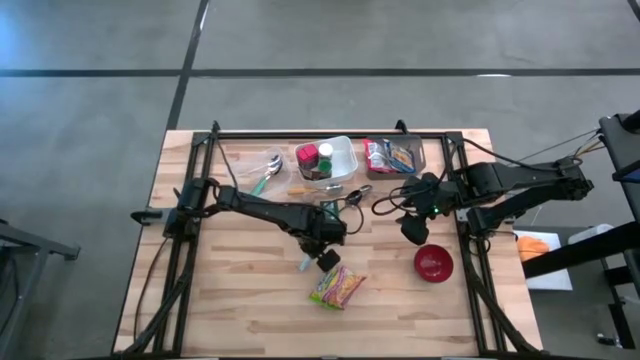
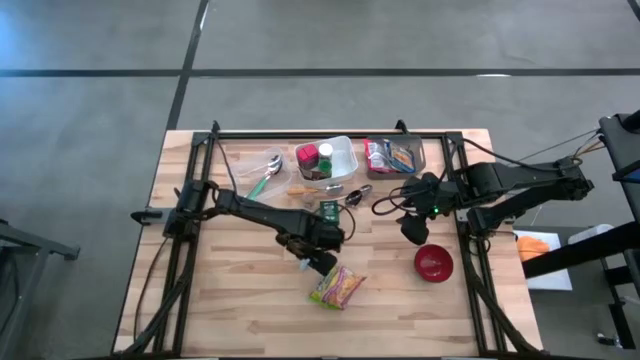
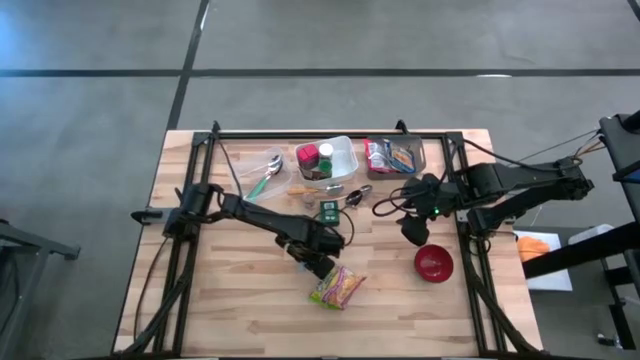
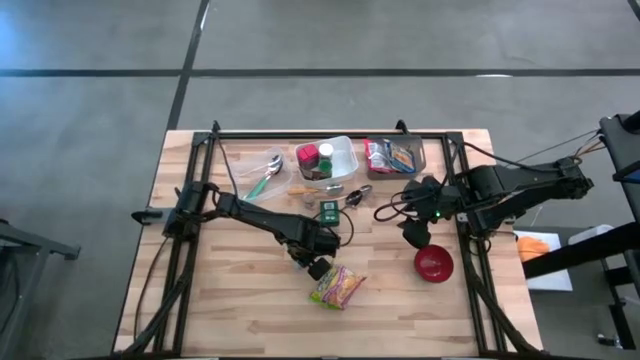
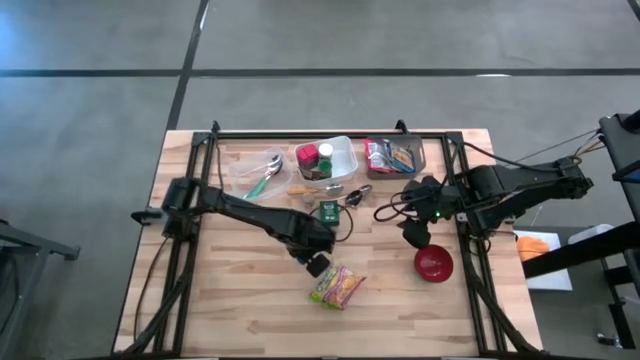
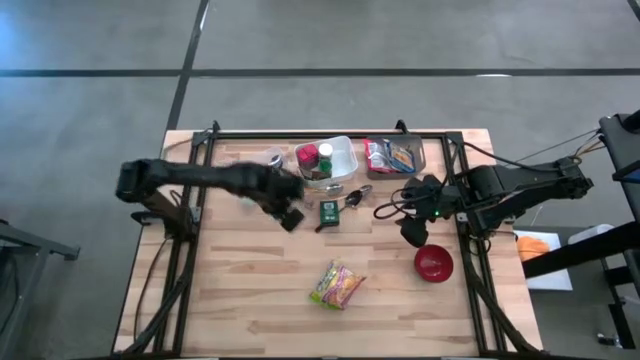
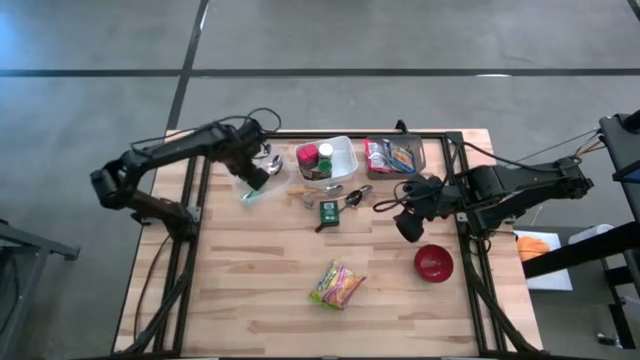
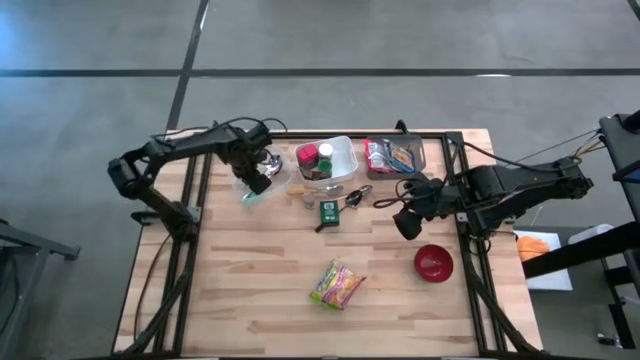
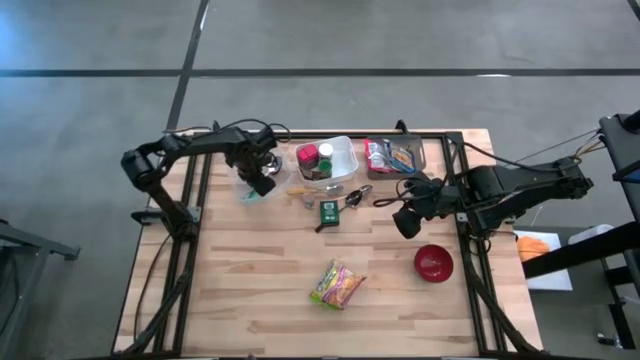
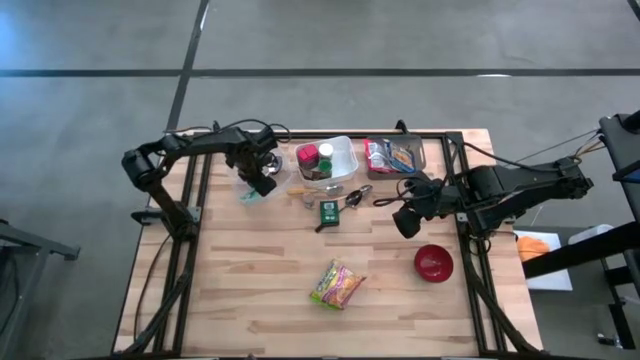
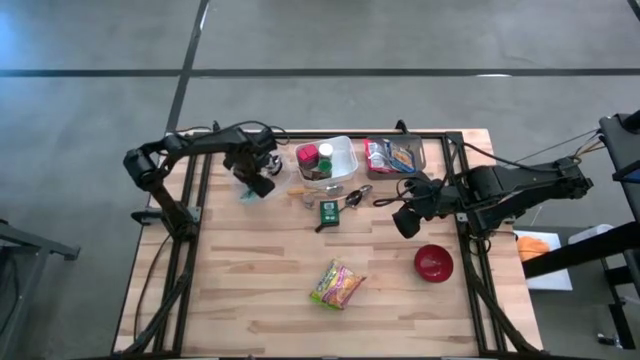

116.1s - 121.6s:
Put the blue spoon into the transparent bin

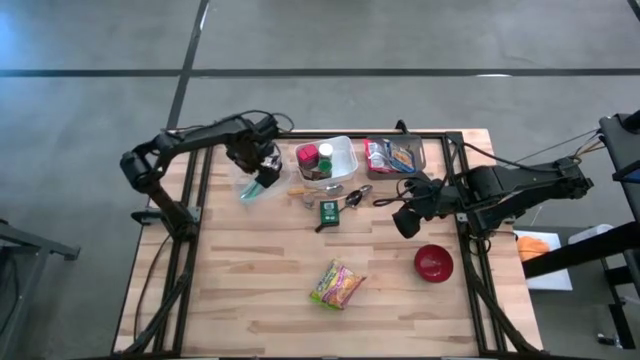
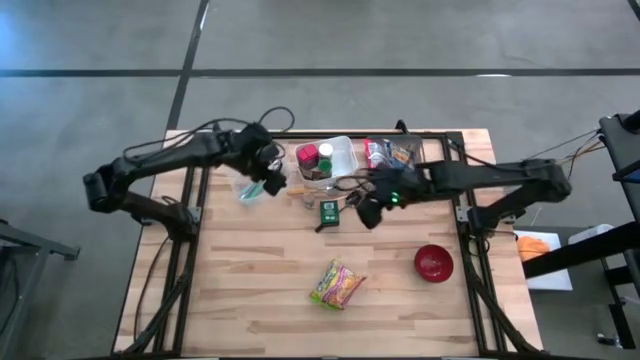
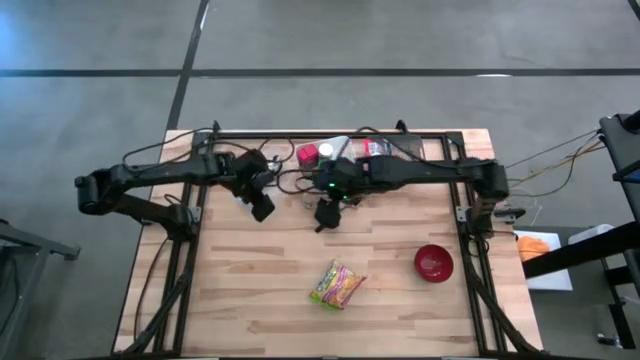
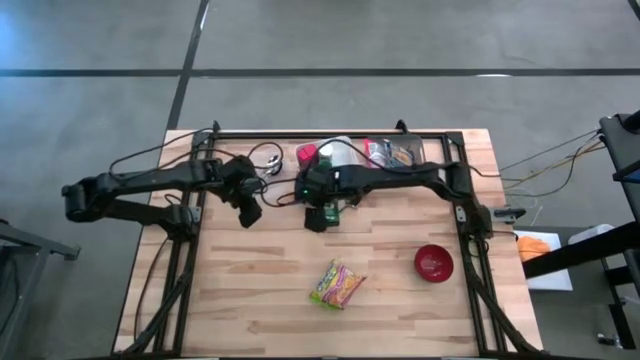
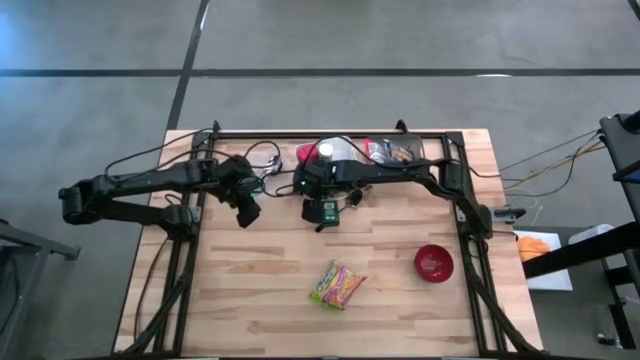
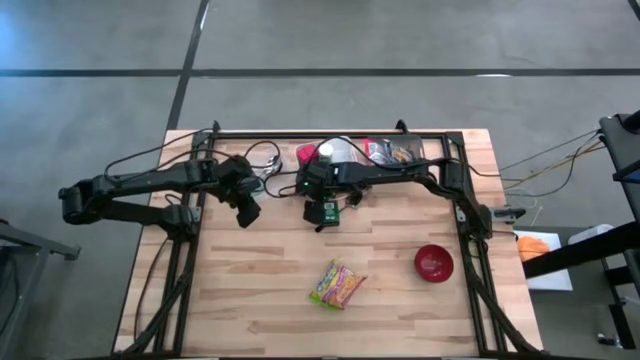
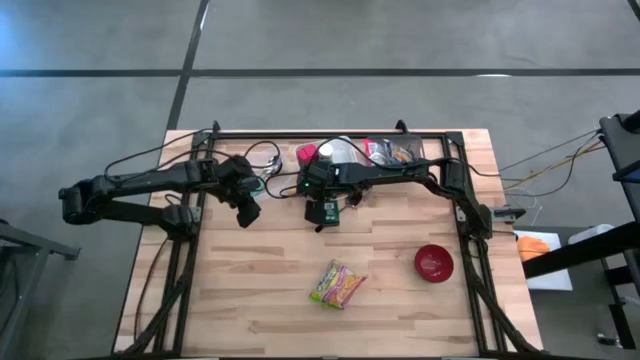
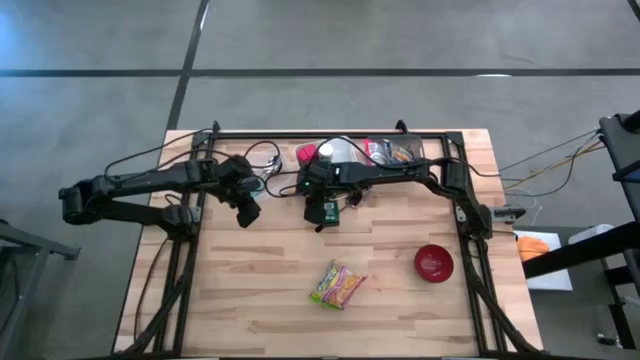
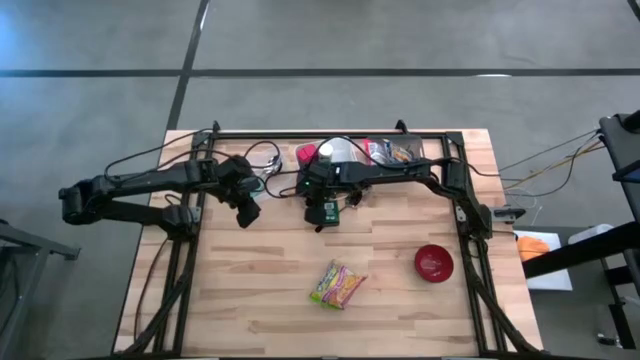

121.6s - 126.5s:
Put the brown seasoning bottle into the white bin

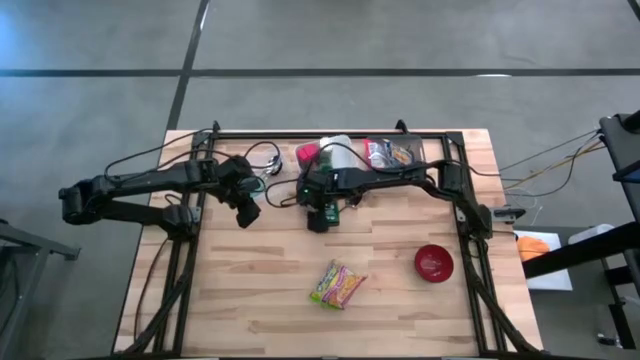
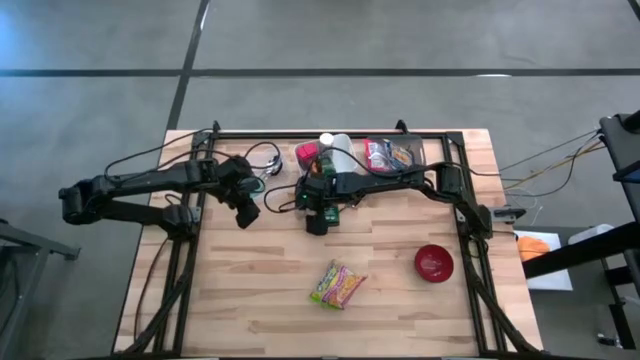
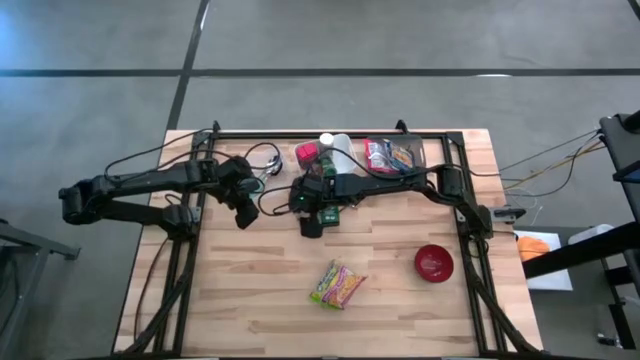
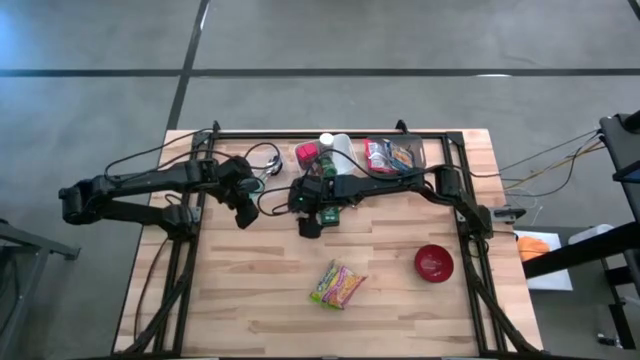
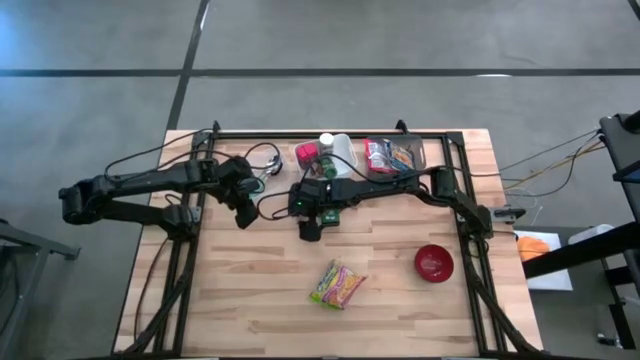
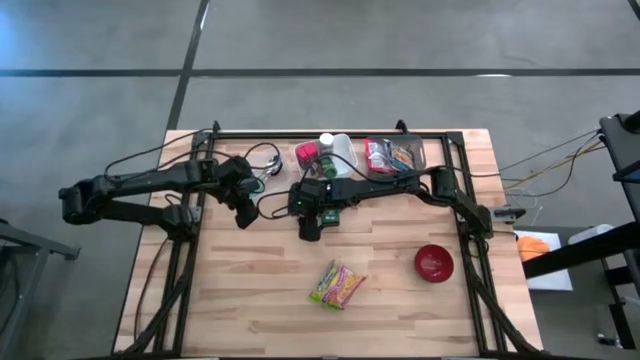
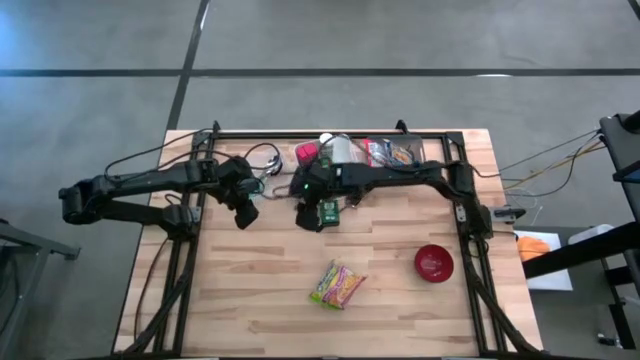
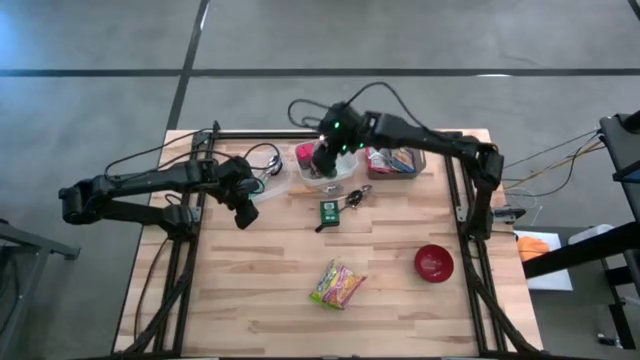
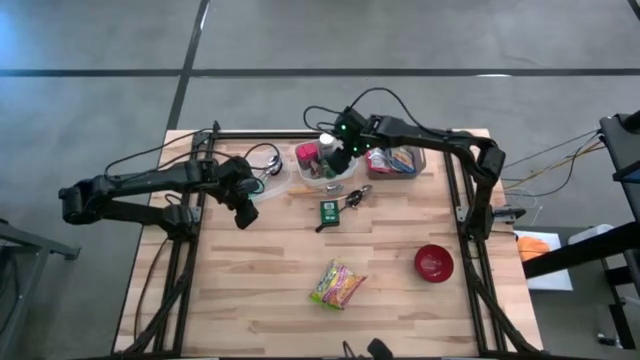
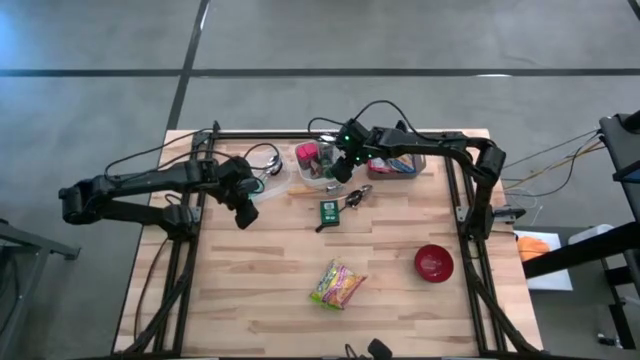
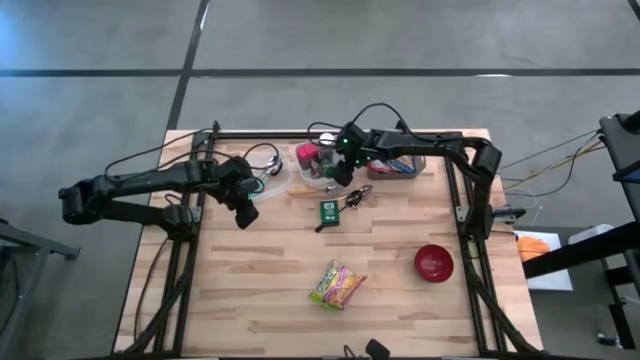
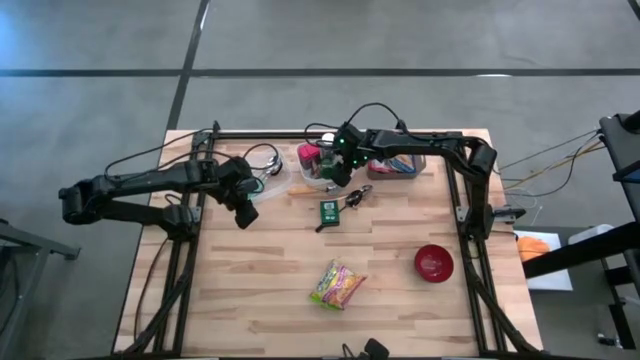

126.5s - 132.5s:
Put the brown seasoning bottle into the white bin

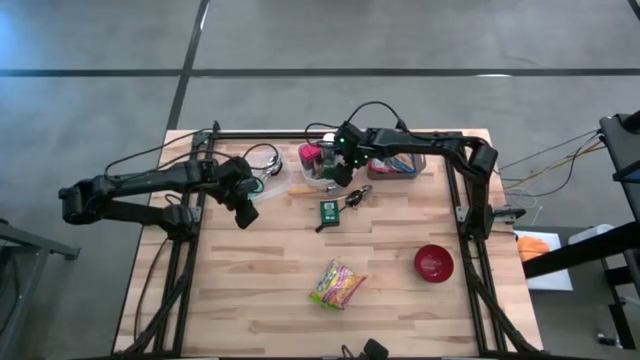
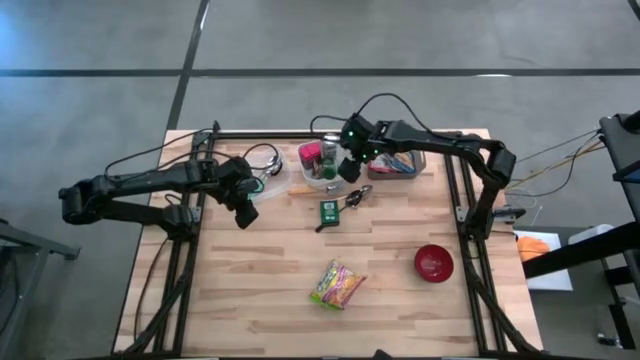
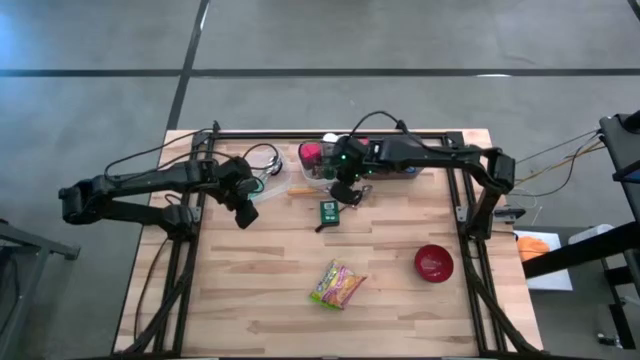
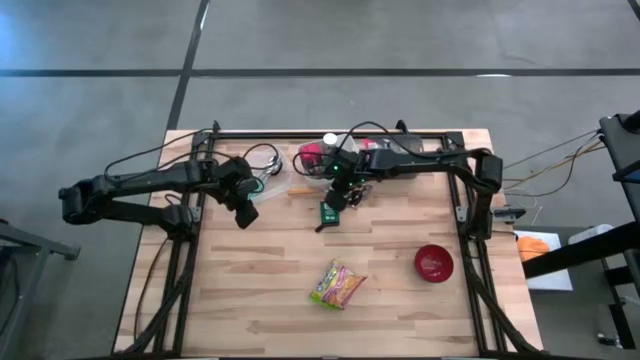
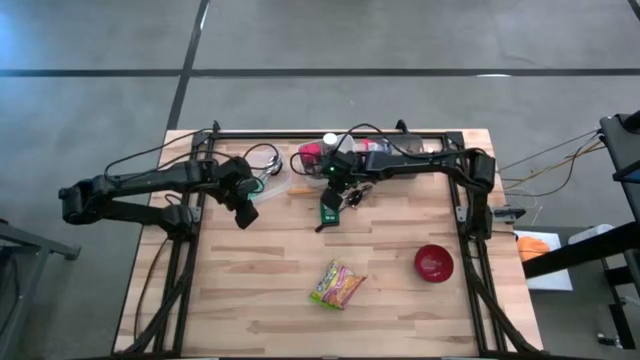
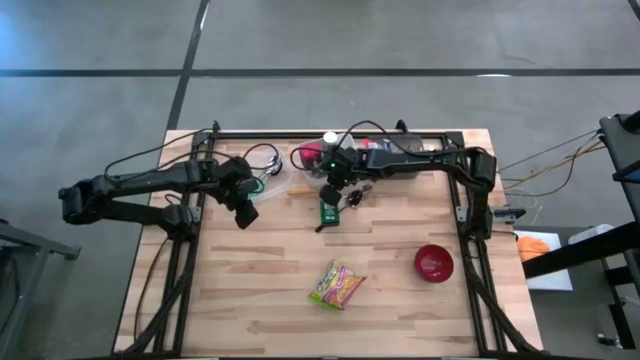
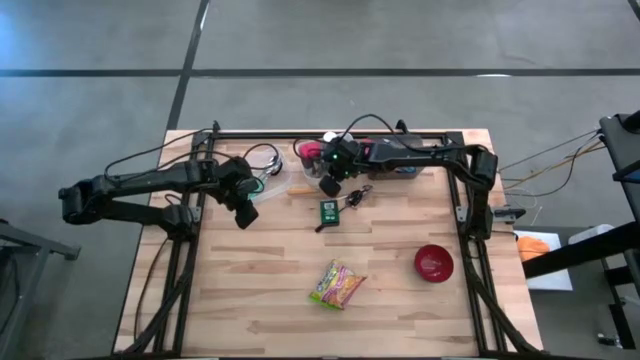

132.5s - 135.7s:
Adjust the green seasoning bottle into the white bin
